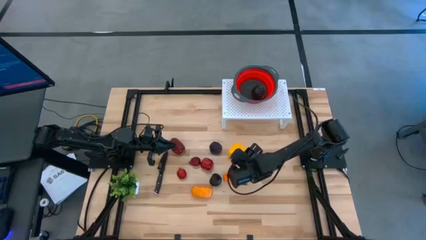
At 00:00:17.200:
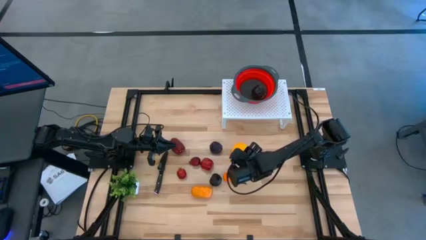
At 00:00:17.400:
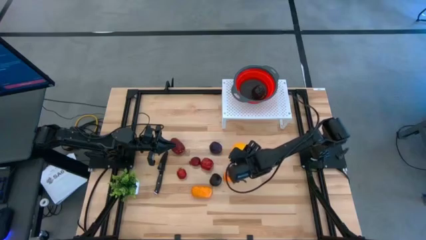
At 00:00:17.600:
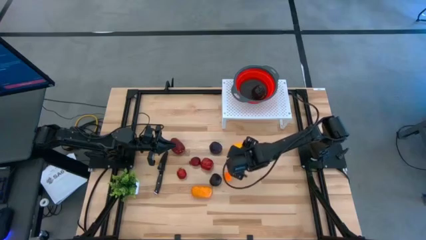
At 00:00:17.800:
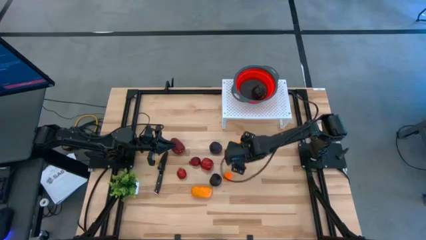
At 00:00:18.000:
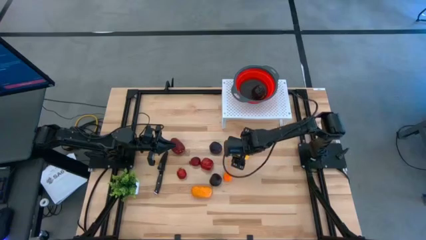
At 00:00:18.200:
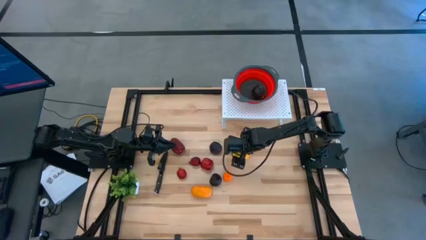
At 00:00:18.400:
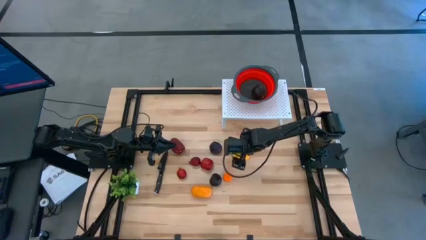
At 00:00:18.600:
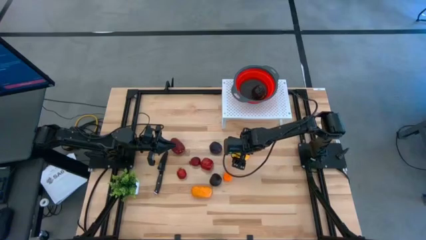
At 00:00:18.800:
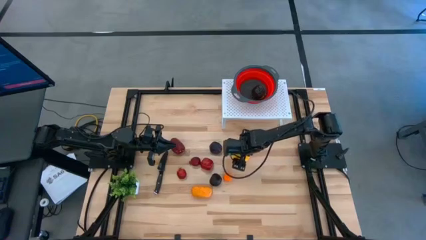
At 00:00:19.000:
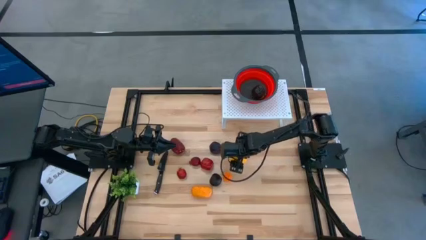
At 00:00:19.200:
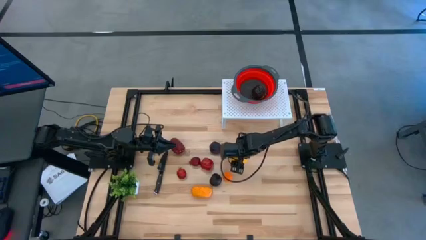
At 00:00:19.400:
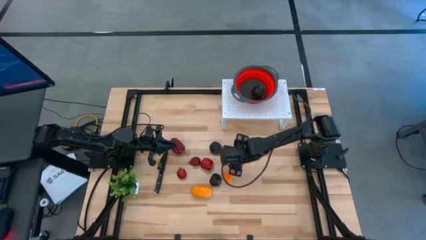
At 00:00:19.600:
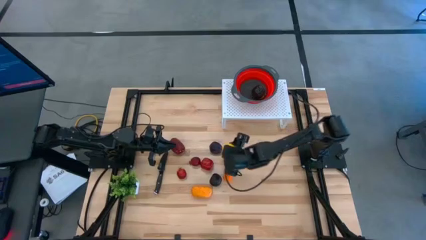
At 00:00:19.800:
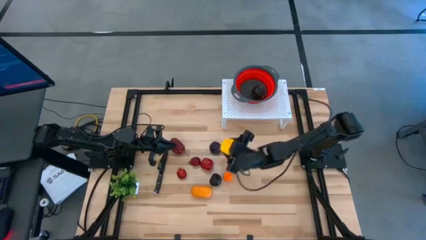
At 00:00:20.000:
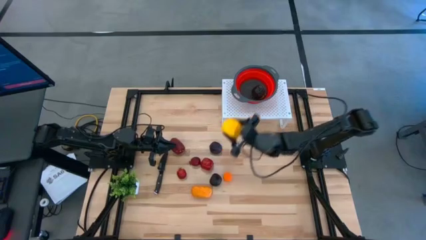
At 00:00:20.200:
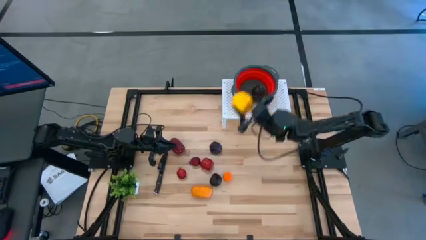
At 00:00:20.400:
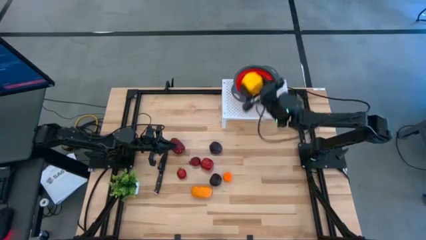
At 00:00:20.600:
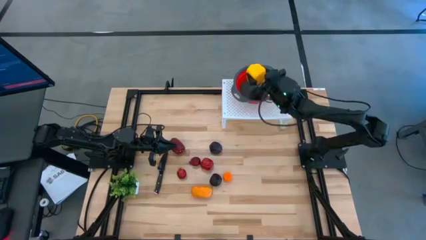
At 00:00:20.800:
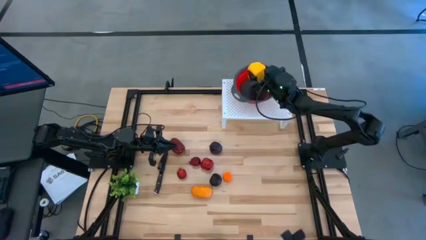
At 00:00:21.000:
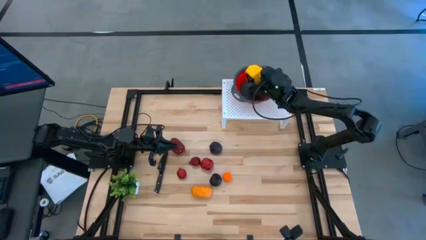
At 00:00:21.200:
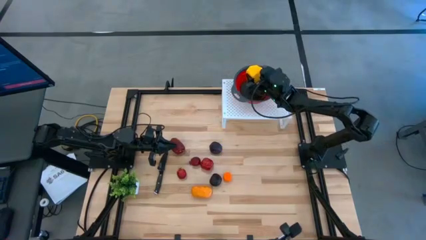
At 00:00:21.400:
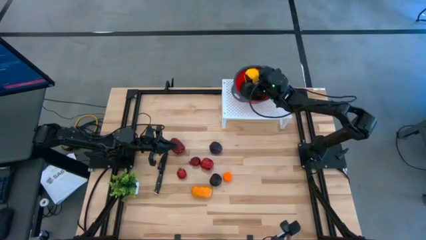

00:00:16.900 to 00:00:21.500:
Task: Pick & Place Fruit
Put the yellow bell pepper into the orange strainer bowl on the shelf

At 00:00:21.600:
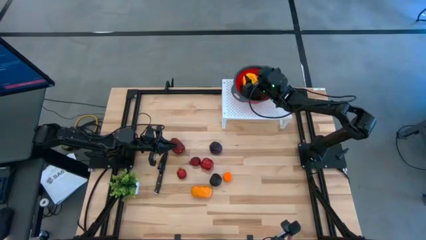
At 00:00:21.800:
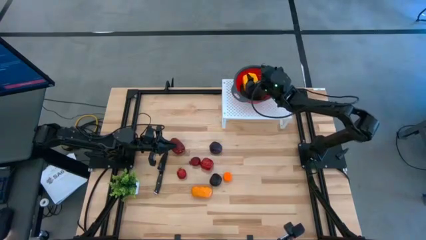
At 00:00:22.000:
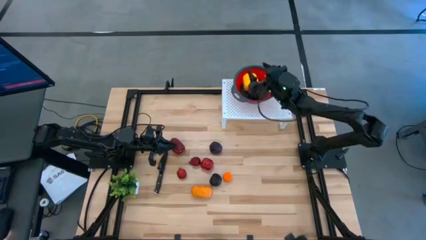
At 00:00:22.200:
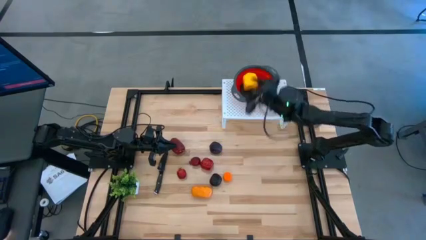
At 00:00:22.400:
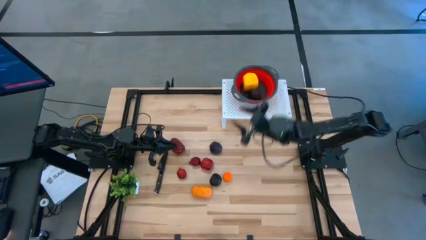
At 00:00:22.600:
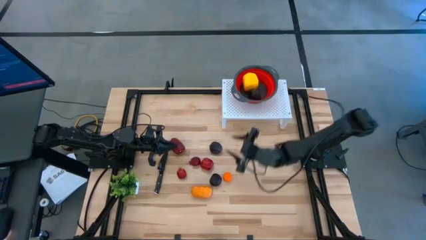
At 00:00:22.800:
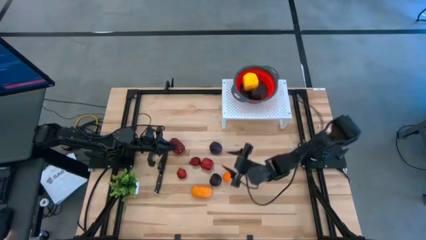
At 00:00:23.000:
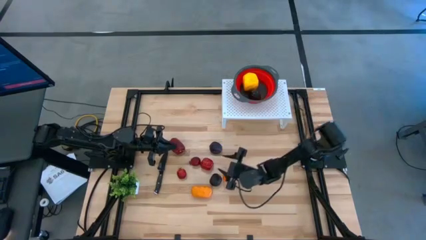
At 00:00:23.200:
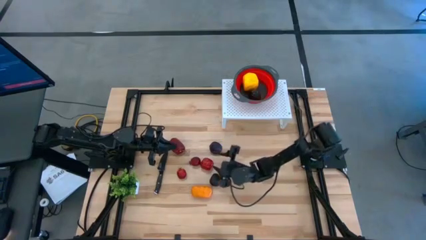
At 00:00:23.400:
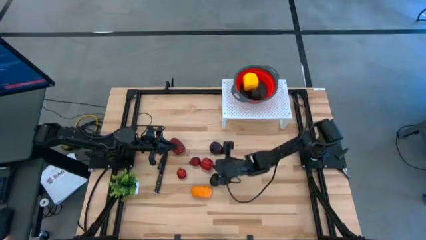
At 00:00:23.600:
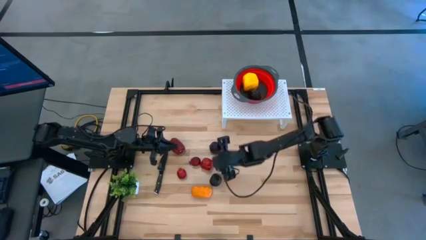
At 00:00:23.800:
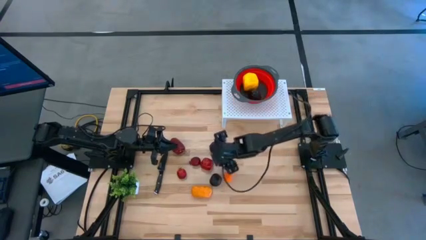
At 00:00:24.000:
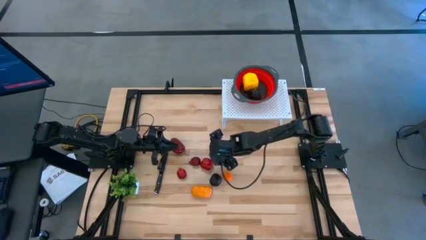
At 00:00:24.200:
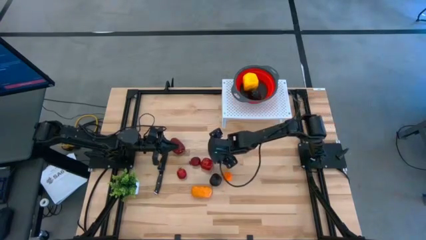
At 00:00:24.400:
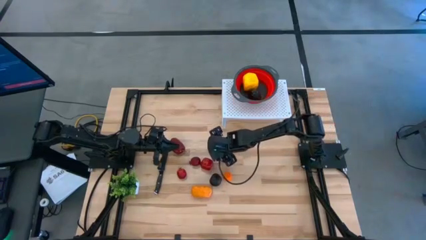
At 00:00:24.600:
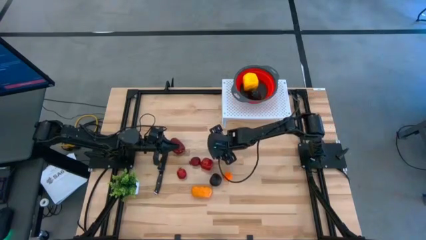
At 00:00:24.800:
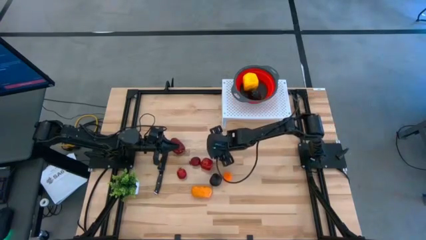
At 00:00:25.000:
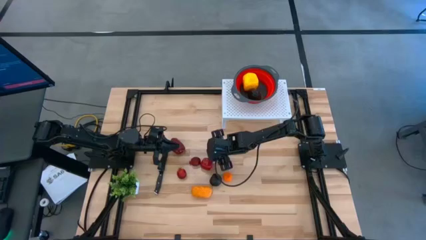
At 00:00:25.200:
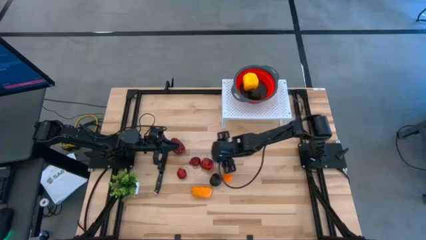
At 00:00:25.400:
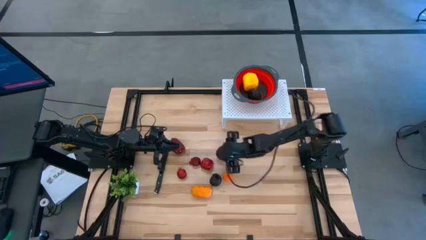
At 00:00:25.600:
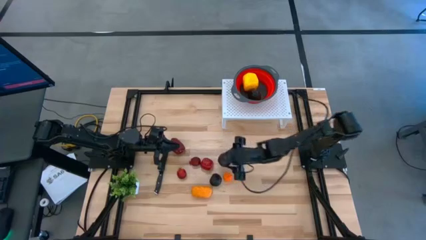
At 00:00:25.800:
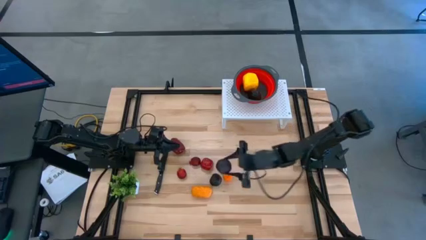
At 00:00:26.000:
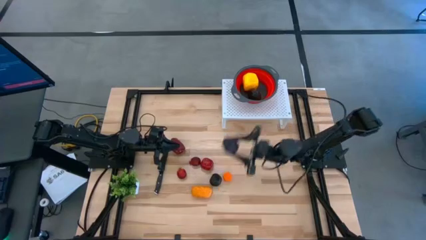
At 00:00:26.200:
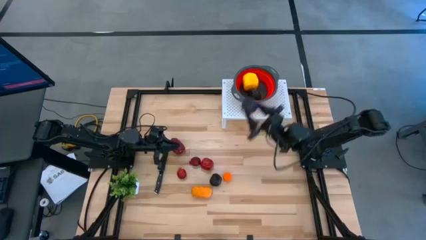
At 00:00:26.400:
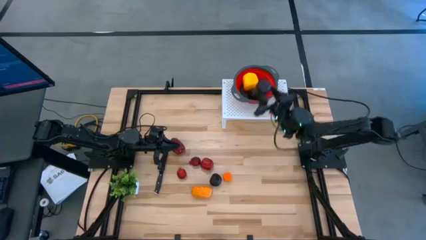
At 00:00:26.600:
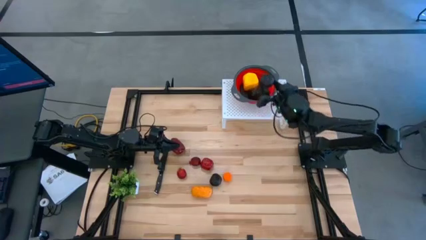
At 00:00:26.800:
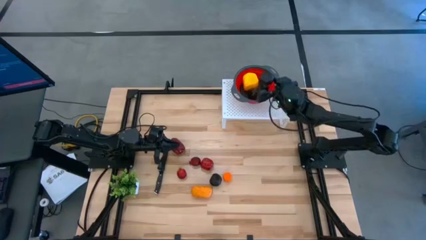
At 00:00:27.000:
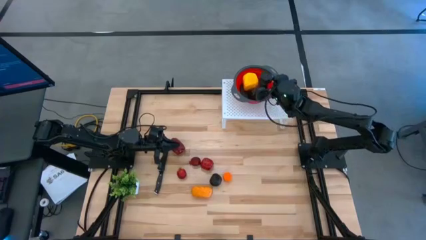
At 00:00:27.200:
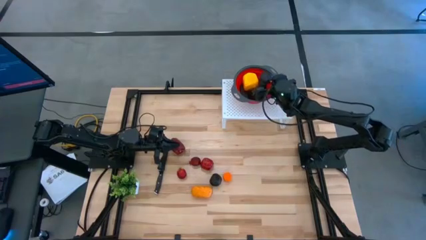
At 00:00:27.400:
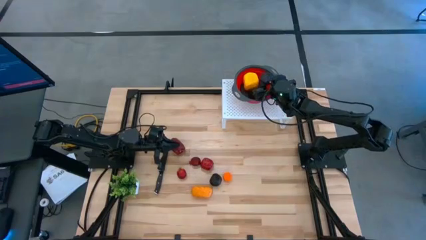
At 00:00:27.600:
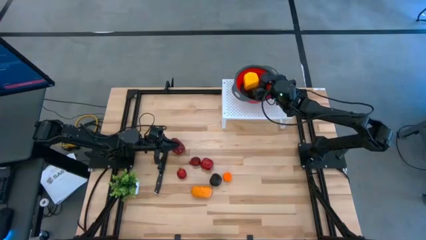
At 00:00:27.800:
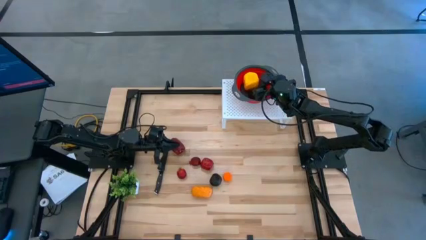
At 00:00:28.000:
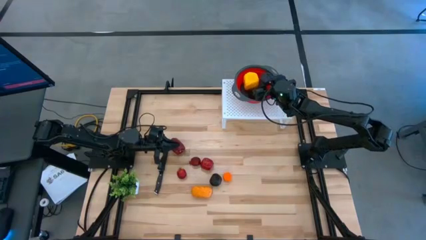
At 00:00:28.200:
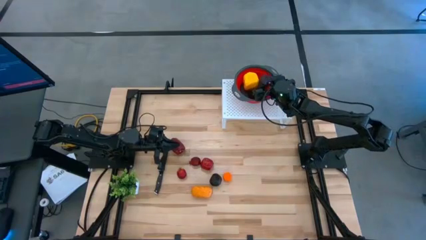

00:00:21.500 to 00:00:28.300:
Put the top purple plum into the orange strainer bowl on the shelf

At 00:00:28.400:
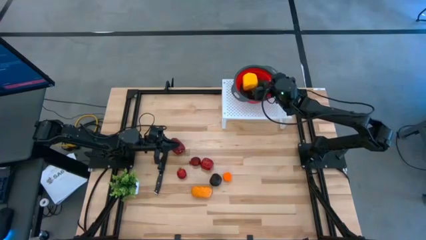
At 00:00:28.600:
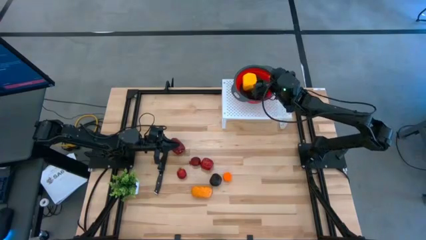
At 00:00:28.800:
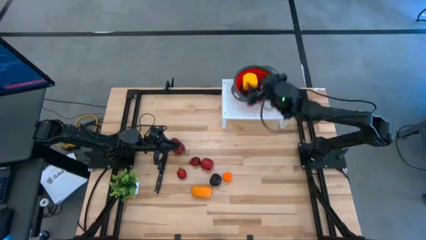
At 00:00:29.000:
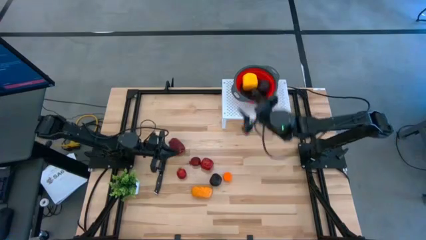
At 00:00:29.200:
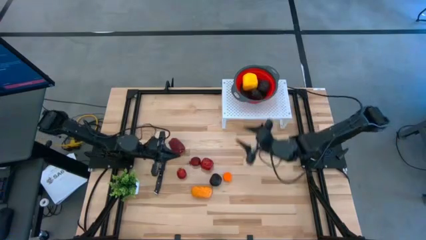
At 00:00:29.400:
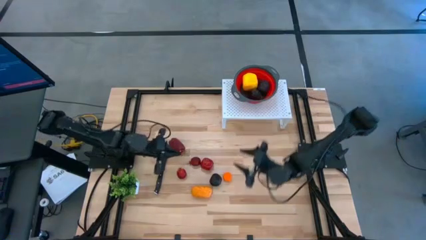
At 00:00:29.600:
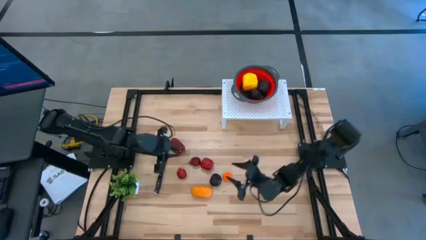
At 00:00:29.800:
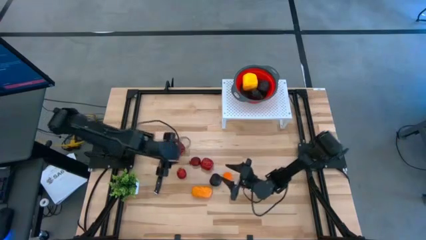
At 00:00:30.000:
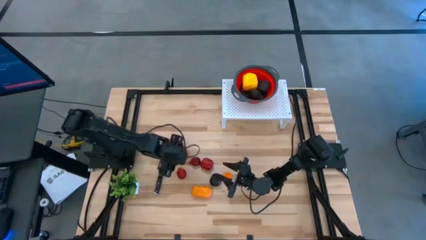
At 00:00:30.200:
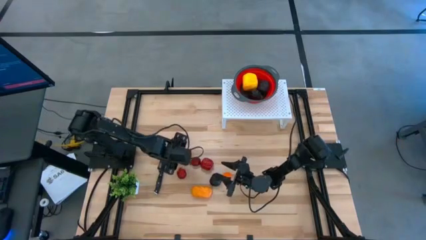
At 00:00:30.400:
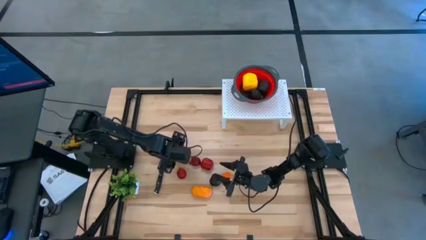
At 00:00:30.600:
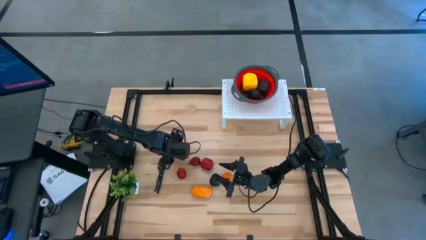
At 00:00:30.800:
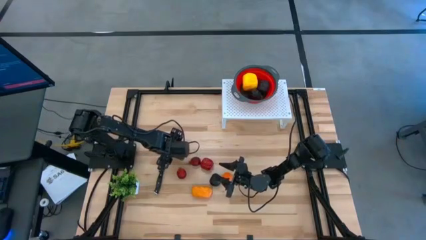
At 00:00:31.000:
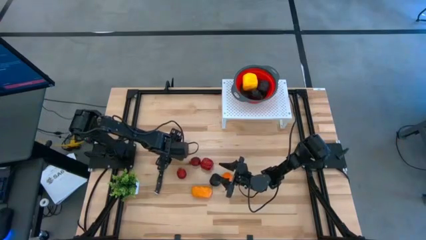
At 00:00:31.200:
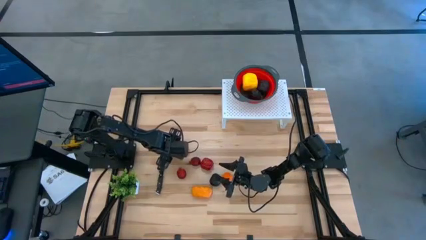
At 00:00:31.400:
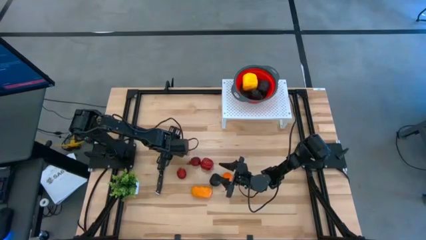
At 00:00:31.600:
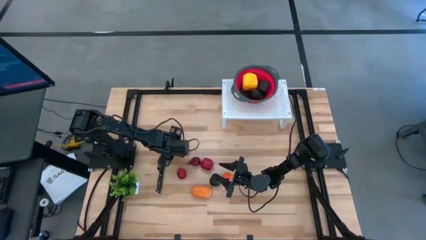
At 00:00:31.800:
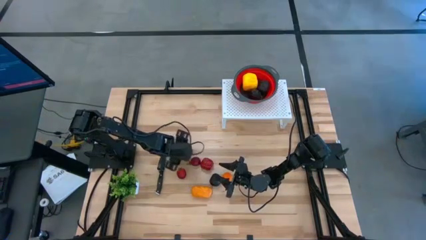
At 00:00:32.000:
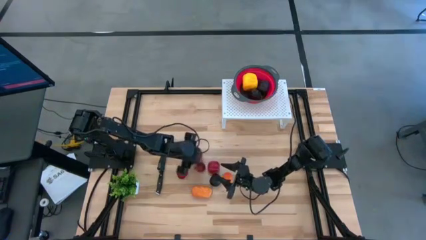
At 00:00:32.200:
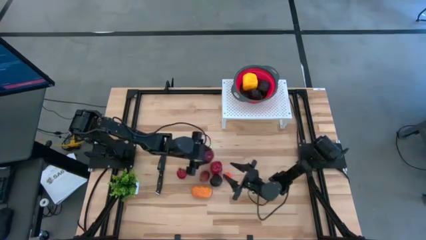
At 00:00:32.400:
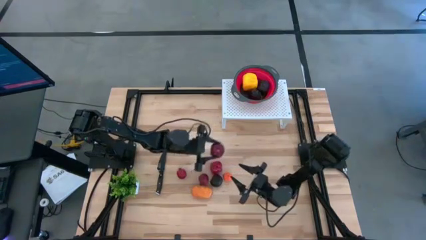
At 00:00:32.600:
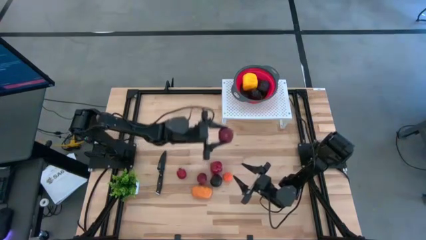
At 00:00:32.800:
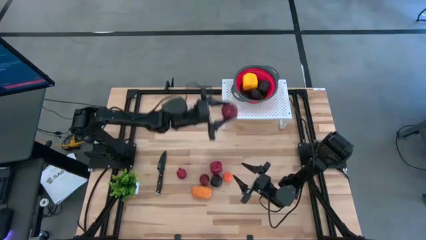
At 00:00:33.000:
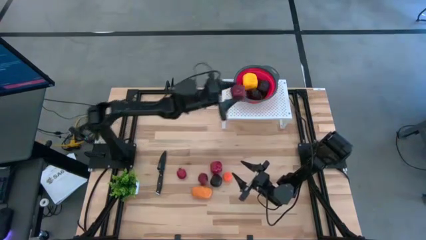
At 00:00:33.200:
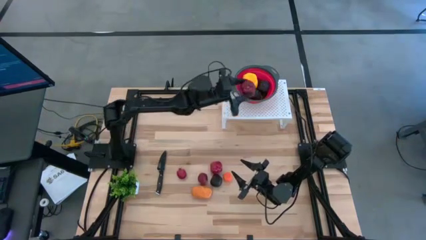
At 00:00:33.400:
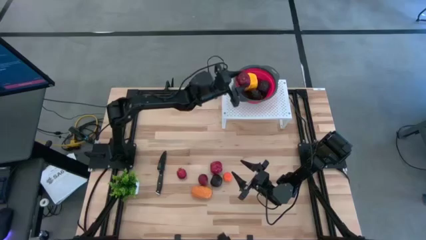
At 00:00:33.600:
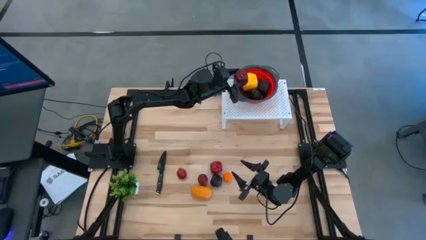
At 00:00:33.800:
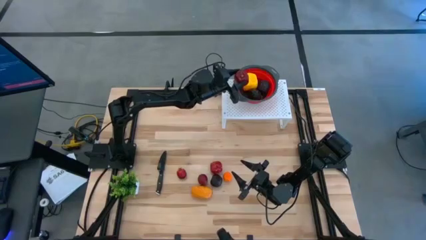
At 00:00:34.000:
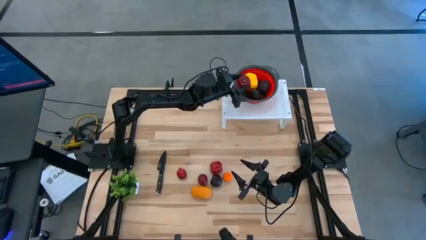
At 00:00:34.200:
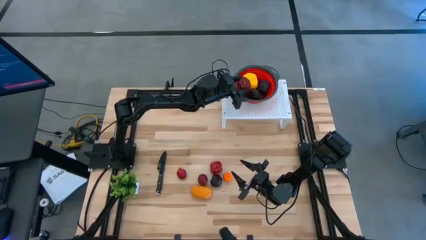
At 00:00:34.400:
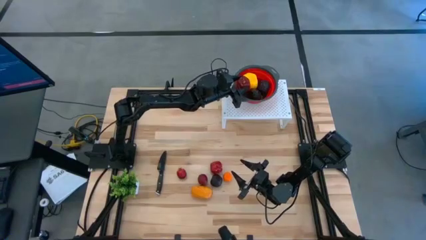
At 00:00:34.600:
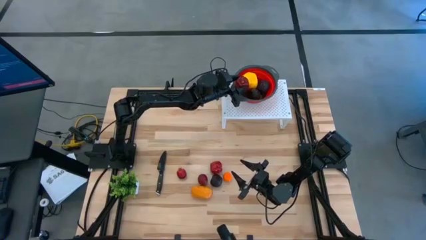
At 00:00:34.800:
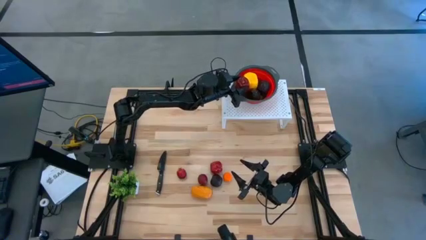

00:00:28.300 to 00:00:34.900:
Put the top red apple into the orange strainer bowl on the shelf
